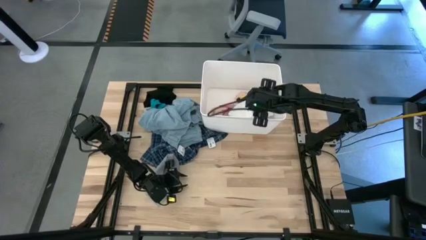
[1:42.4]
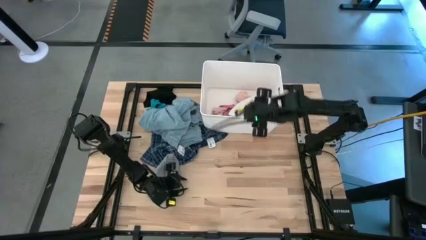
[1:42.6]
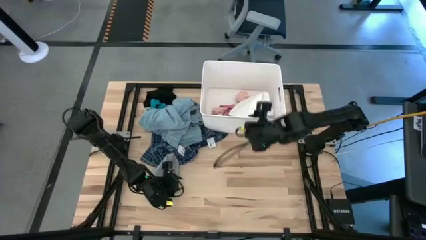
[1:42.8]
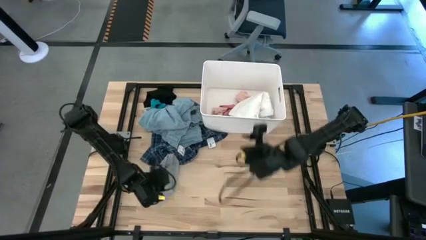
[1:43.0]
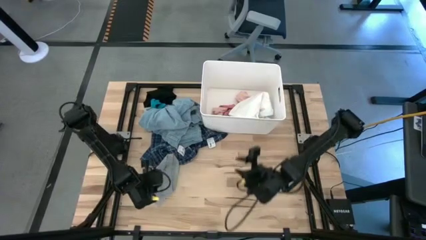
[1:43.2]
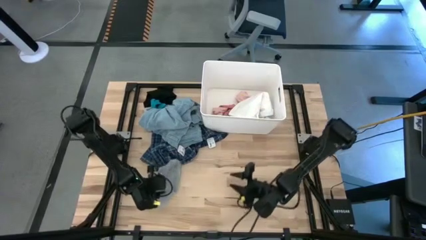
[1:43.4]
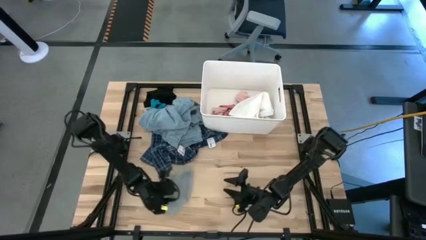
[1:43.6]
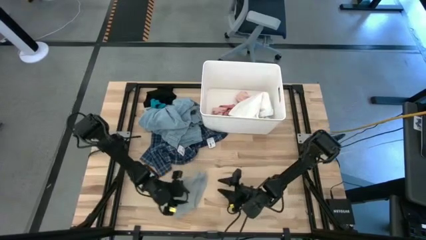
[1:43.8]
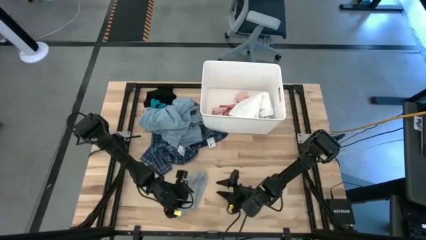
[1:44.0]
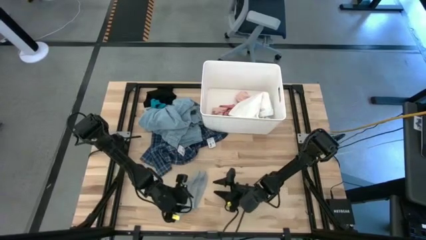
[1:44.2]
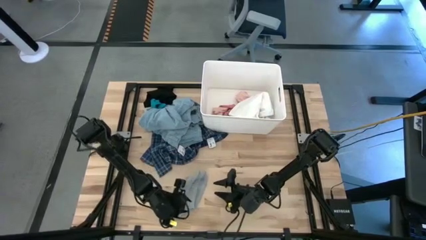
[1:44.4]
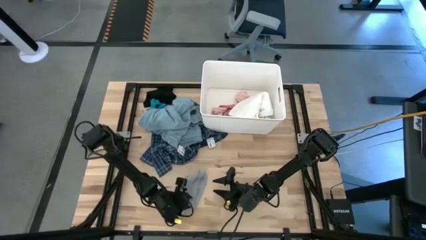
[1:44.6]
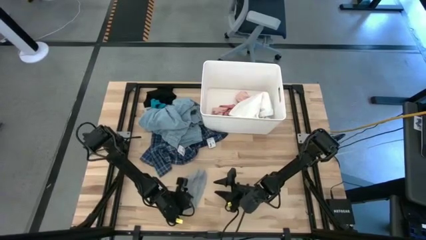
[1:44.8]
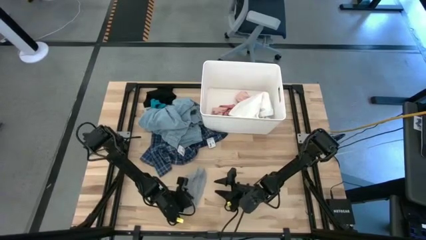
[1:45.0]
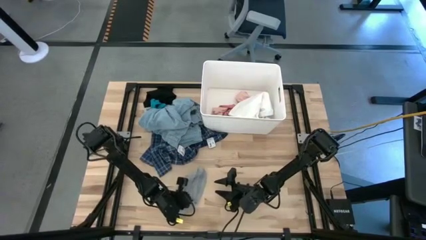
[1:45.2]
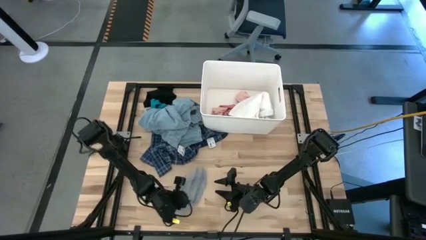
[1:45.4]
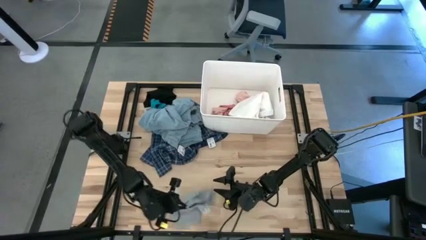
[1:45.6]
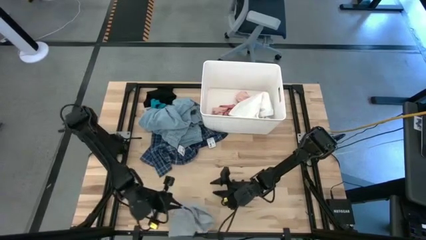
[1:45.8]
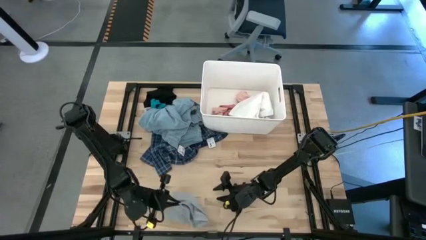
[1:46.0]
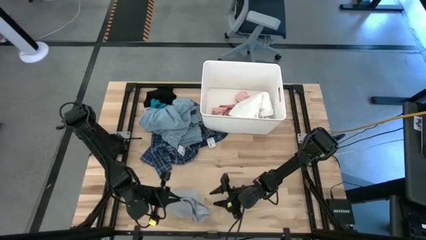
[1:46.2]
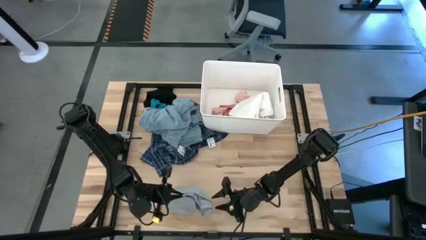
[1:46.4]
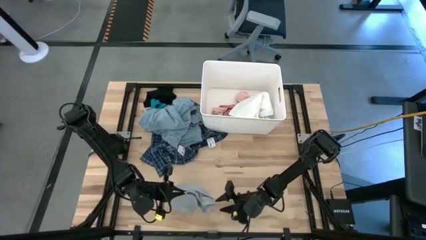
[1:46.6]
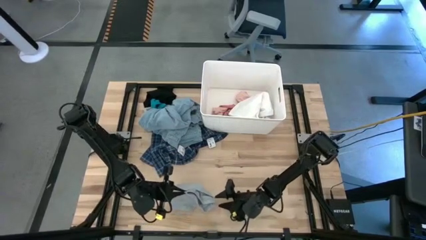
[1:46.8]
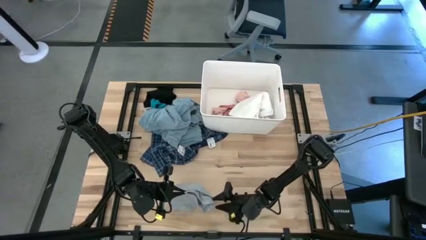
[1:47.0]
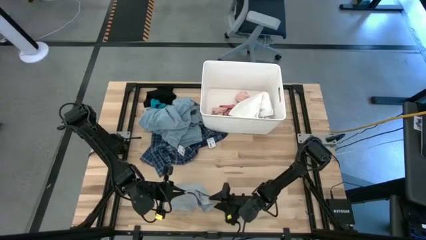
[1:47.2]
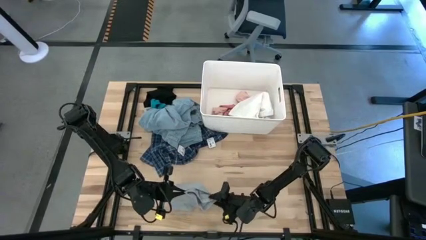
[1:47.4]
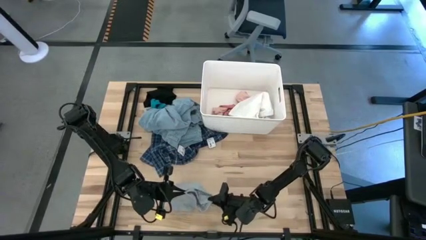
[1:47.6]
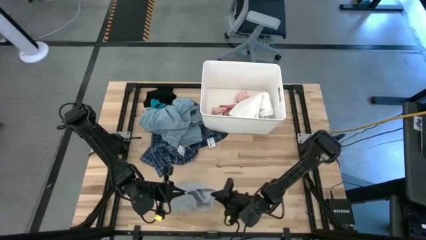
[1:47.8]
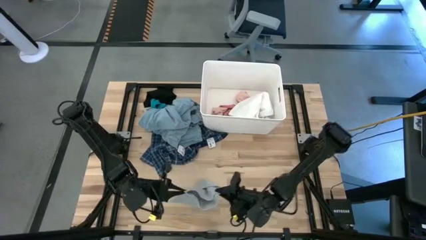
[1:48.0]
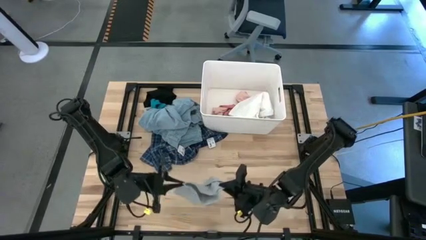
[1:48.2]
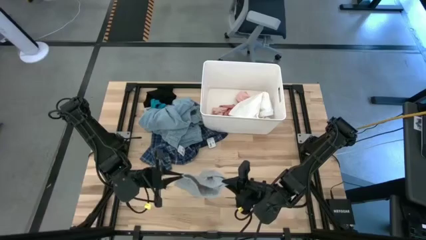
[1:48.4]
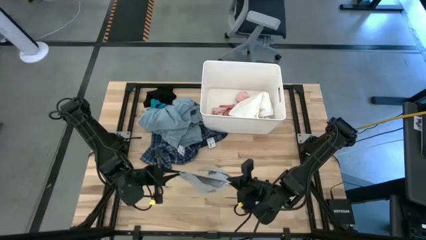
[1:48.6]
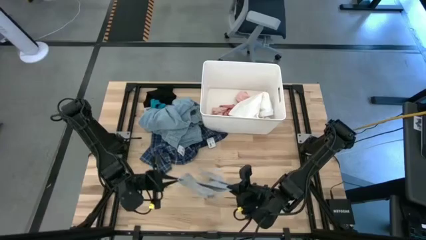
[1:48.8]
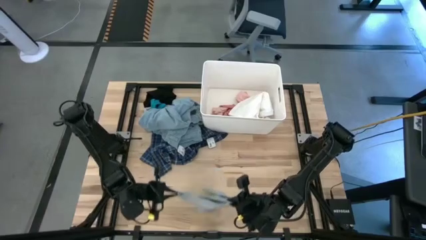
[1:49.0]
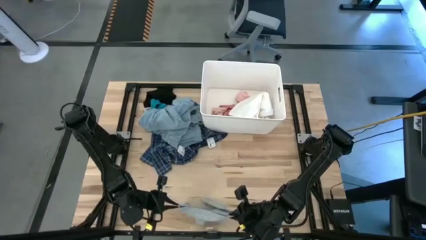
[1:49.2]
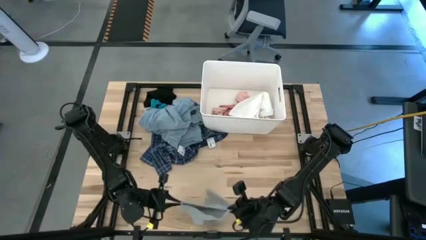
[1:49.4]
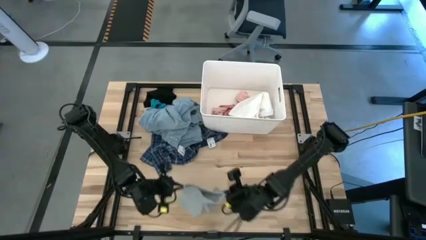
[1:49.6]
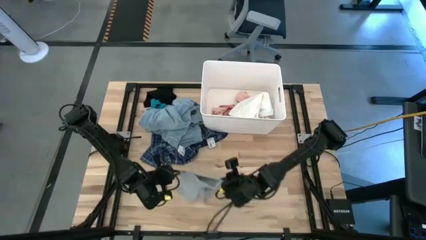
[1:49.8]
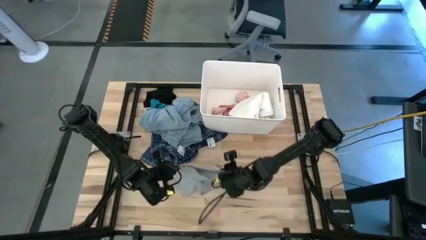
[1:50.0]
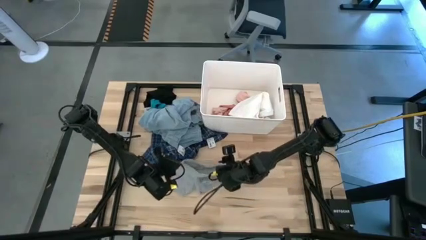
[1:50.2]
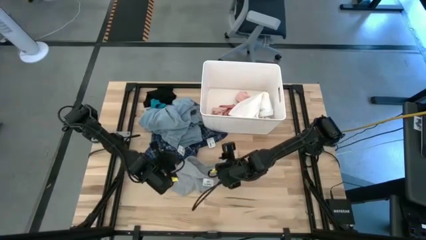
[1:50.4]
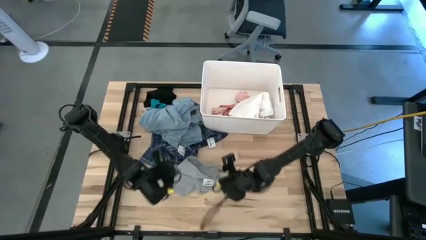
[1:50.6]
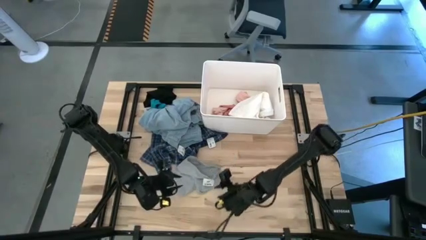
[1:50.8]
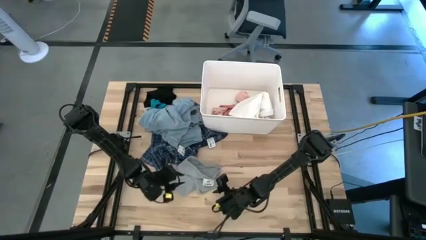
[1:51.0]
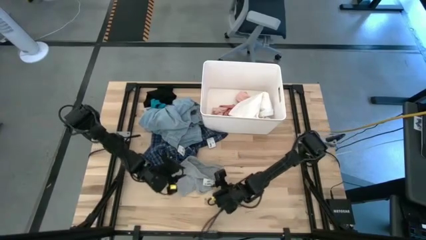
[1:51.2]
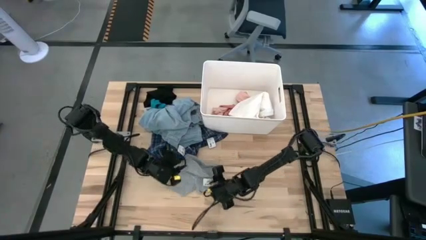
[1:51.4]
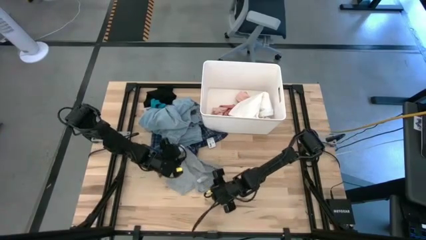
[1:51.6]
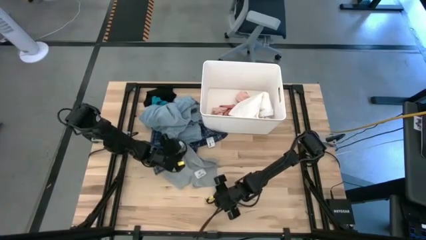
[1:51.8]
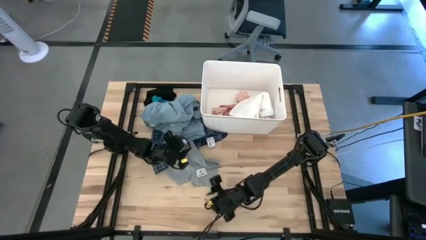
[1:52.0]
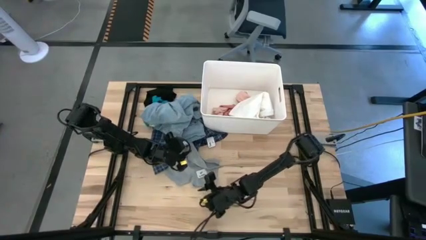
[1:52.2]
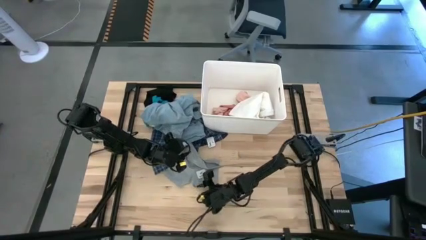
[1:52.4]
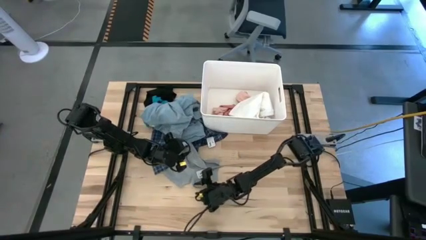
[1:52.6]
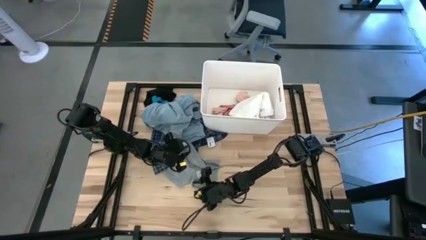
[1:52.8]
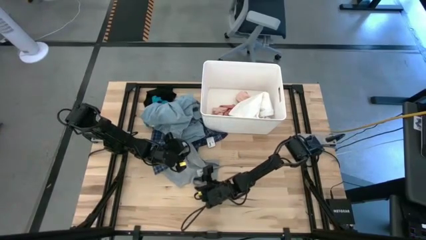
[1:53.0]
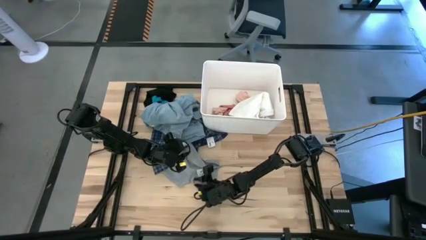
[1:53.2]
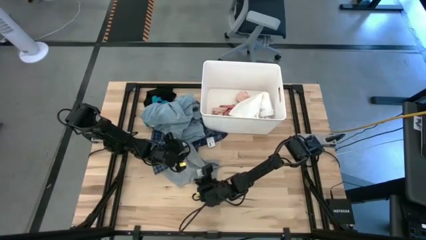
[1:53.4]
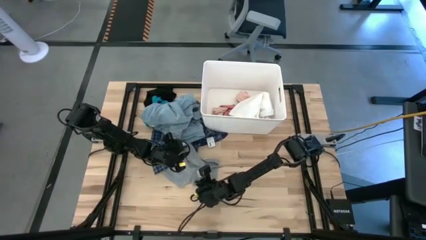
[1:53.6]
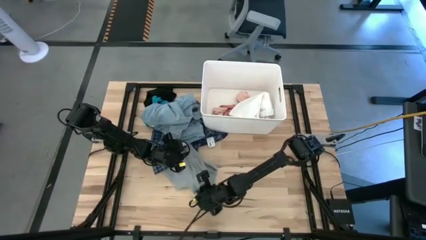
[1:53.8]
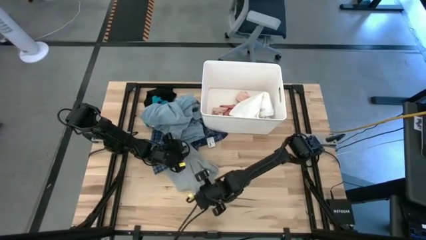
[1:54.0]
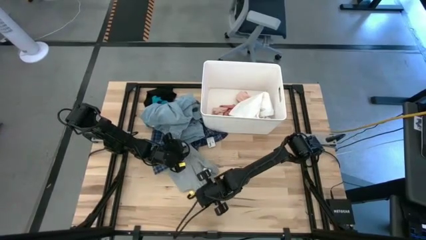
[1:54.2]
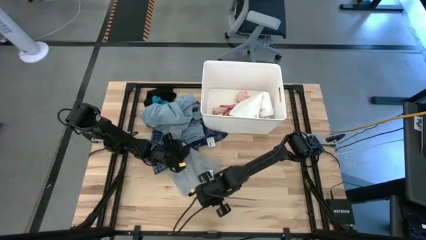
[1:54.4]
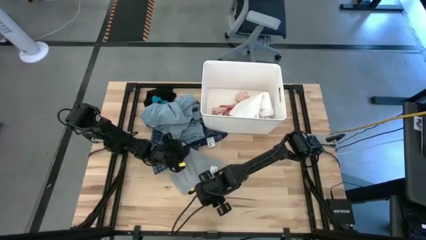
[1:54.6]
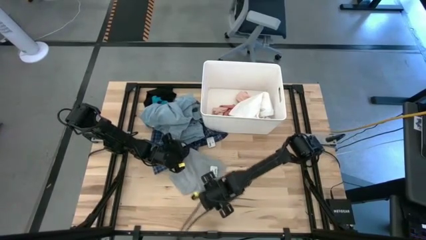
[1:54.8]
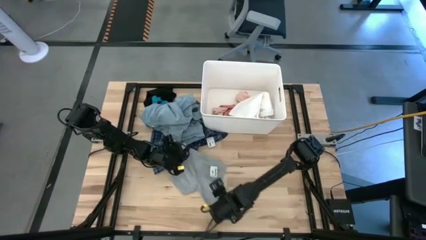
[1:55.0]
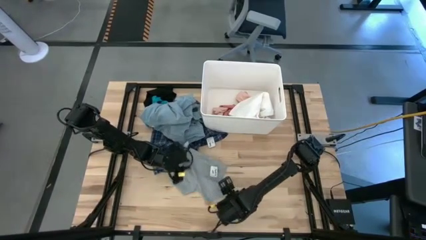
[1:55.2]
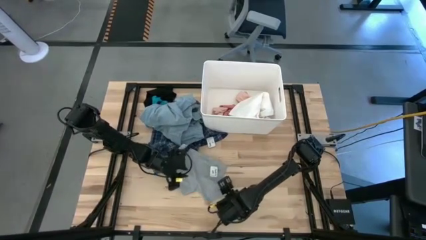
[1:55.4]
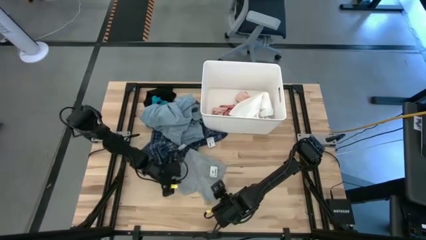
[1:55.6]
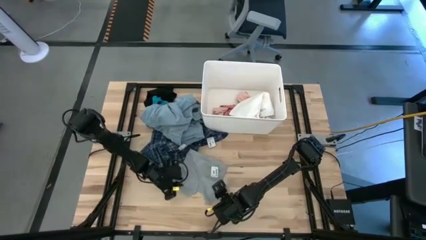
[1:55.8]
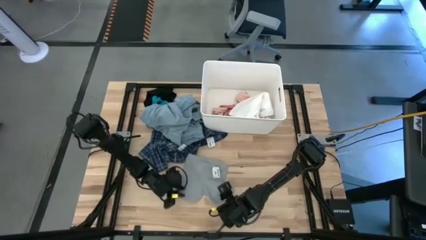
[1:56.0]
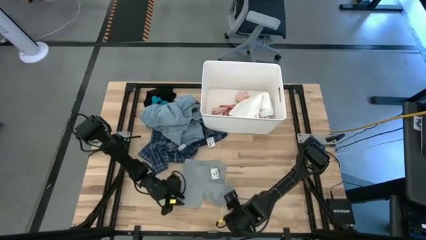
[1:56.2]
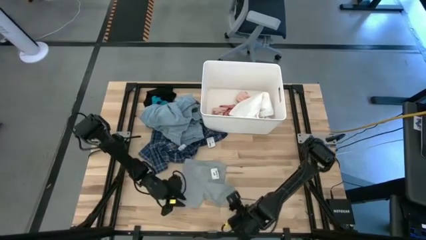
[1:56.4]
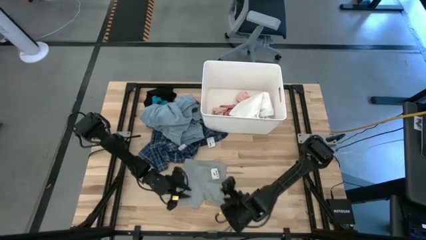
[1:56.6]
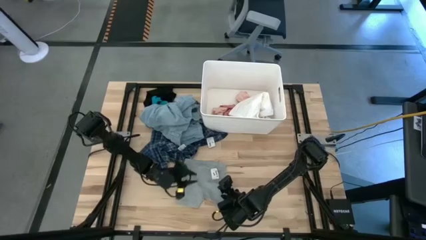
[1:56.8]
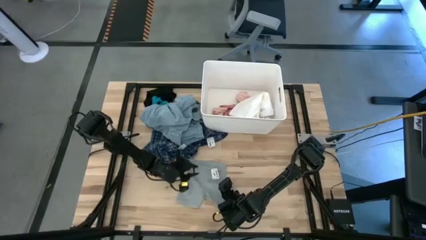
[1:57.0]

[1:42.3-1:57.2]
Task: Sort clothes
Put the gray boxer into the white laundry bin

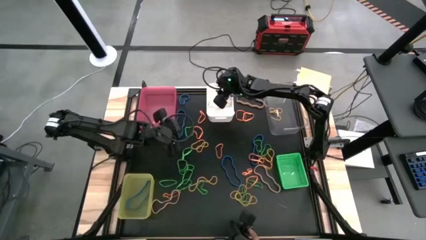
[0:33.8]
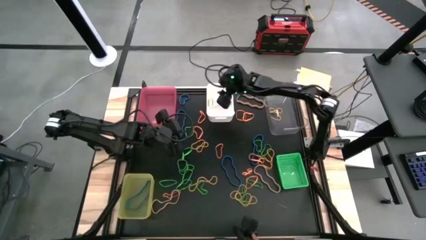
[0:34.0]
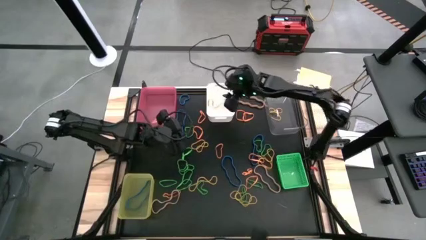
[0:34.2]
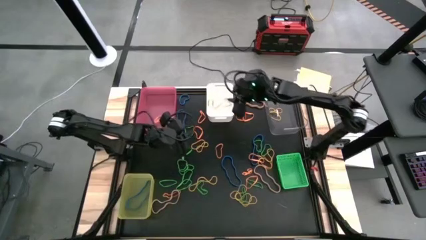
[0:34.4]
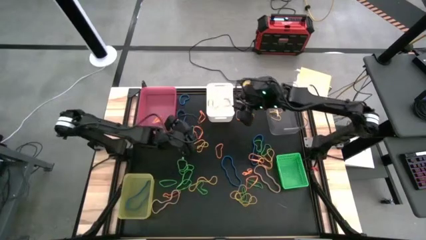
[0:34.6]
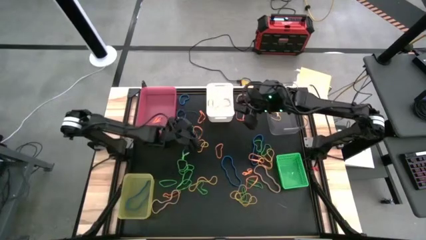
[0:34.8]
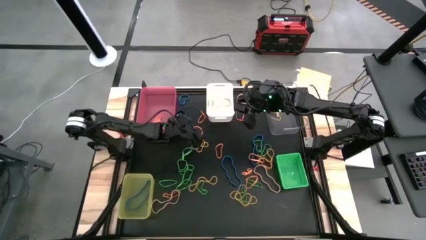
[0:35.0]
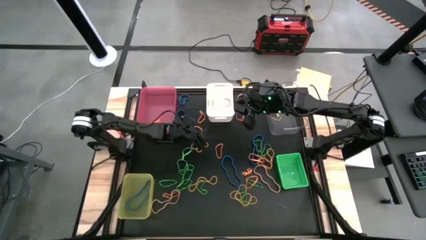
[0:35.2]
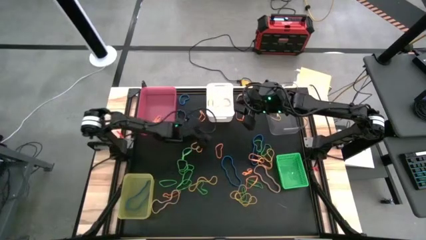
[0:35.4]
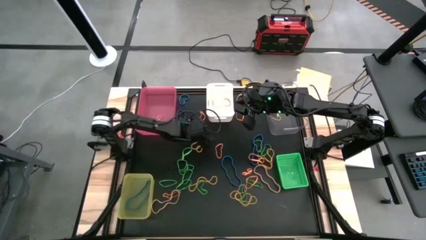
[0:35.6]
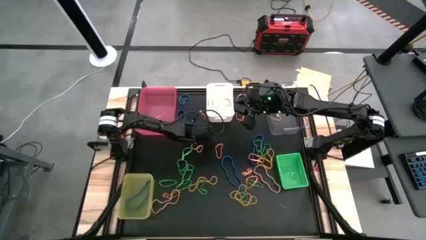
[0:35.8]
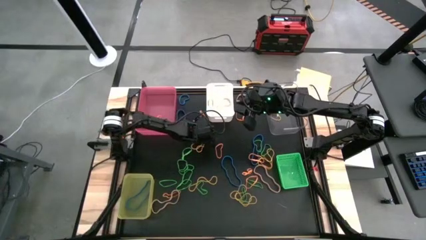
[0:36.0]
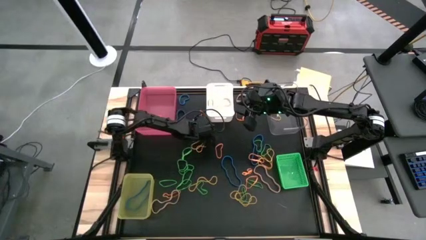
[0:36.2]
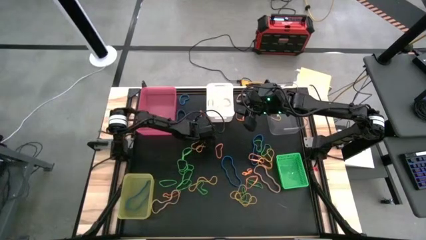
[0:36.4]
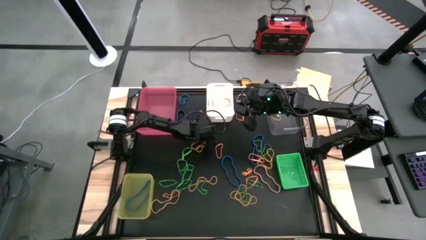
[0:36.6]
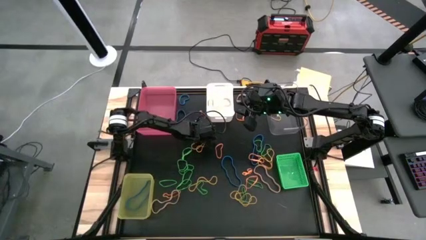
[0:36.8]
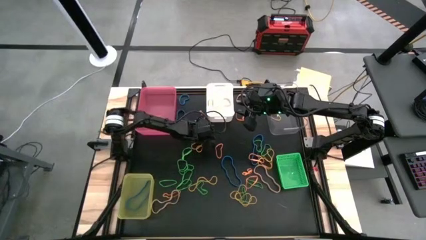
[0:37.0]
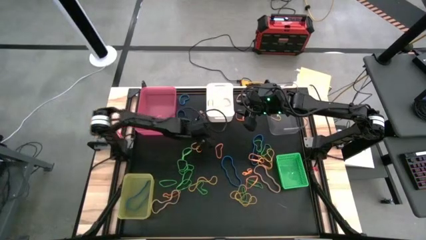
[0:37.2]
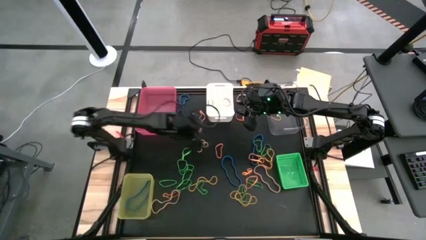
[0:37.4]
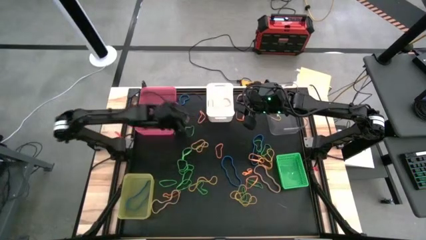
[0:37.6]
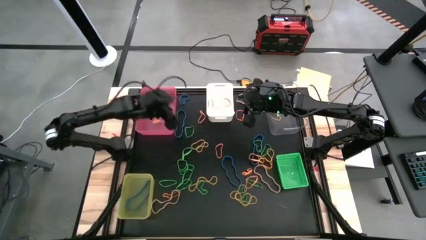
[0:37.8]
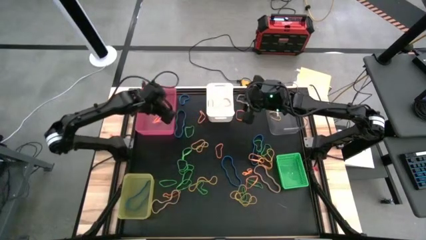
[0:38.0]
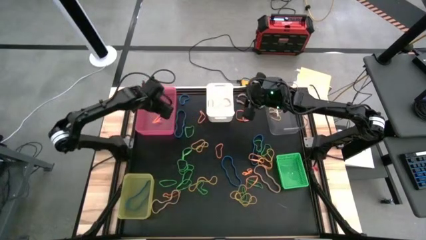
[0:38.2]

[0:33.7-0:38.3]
Task: Sort rubber bands into baskets
Put the orange rubber band into the pink bin
